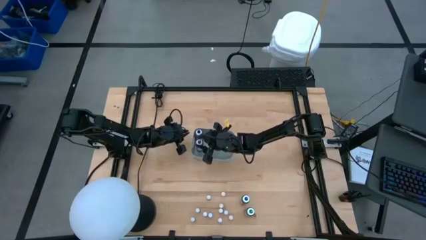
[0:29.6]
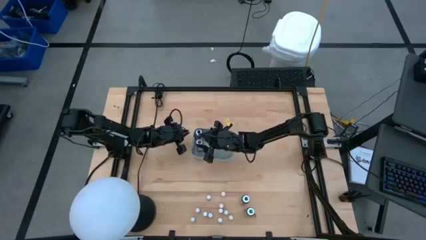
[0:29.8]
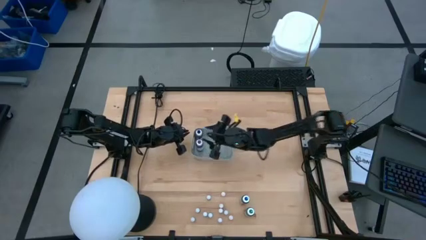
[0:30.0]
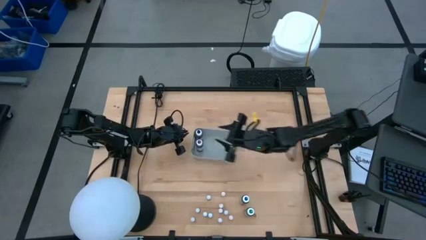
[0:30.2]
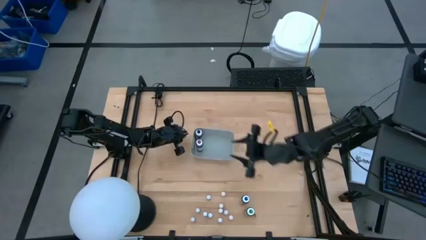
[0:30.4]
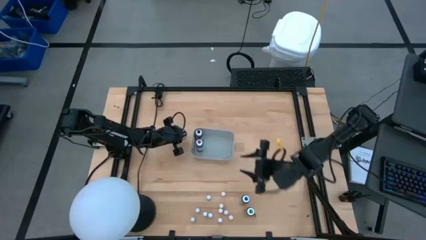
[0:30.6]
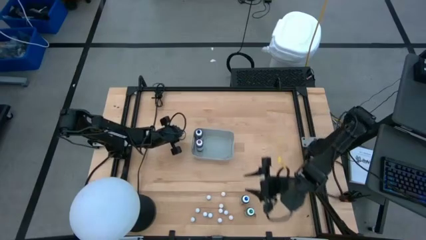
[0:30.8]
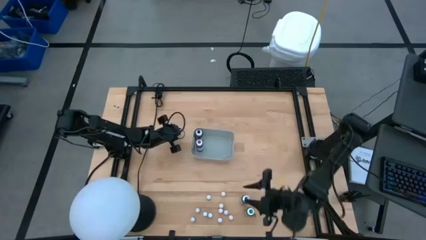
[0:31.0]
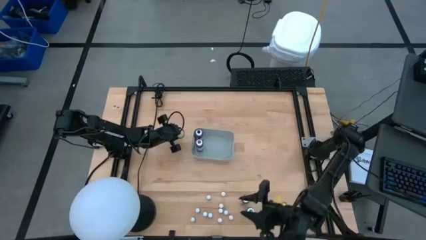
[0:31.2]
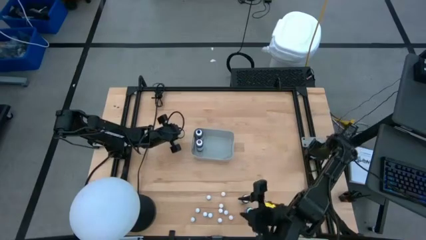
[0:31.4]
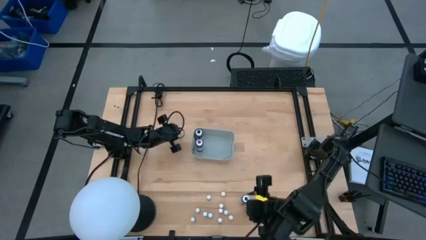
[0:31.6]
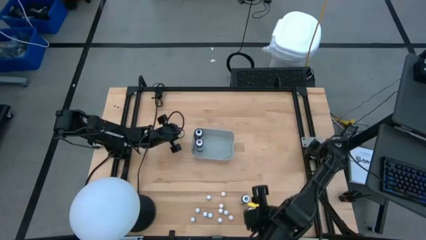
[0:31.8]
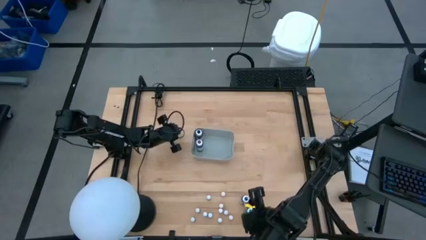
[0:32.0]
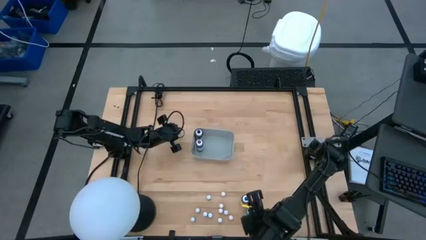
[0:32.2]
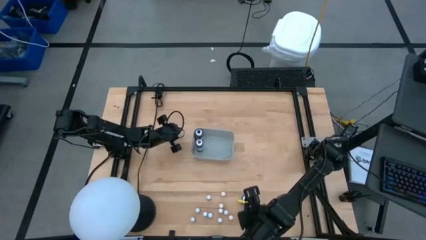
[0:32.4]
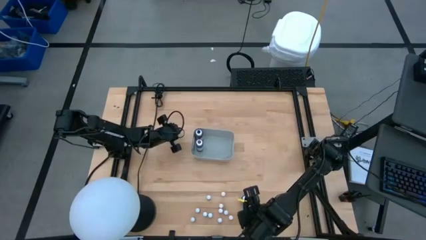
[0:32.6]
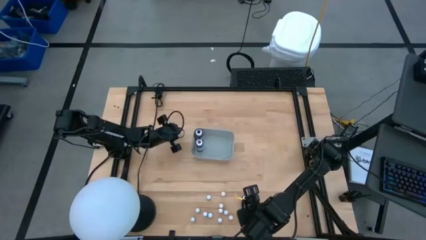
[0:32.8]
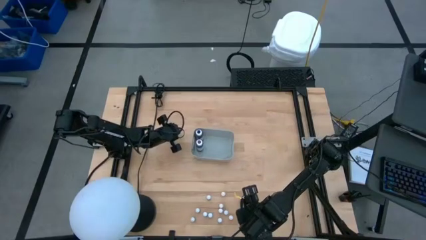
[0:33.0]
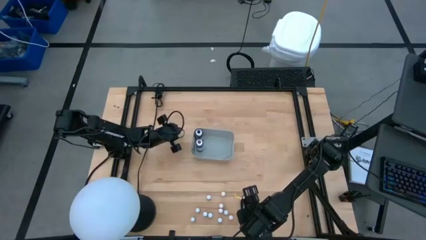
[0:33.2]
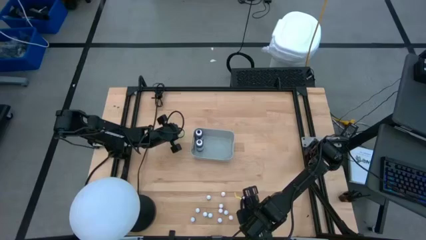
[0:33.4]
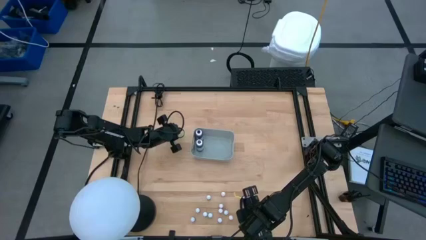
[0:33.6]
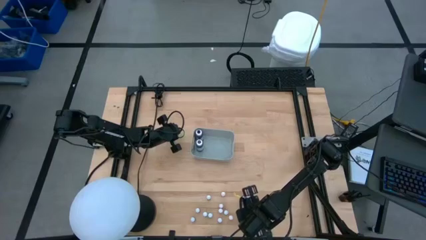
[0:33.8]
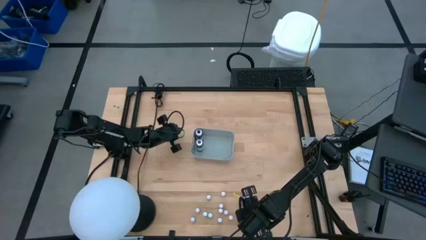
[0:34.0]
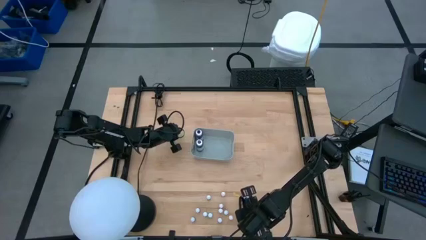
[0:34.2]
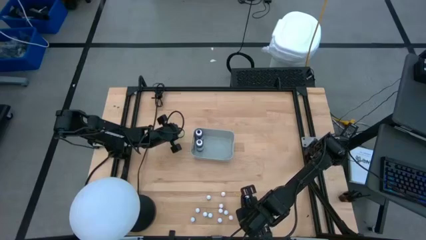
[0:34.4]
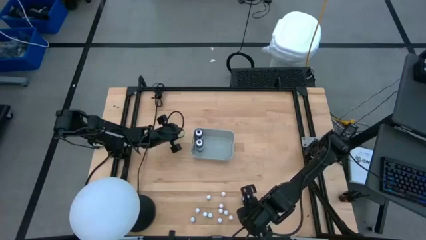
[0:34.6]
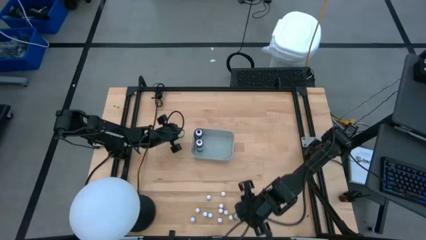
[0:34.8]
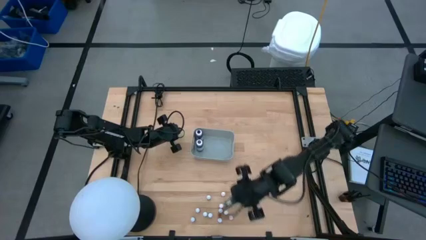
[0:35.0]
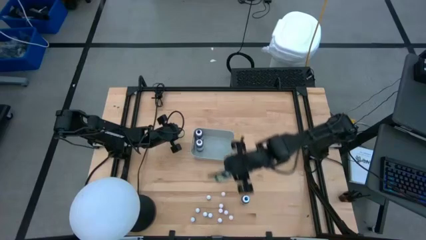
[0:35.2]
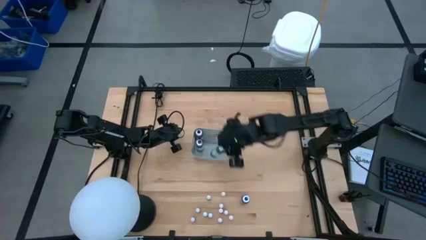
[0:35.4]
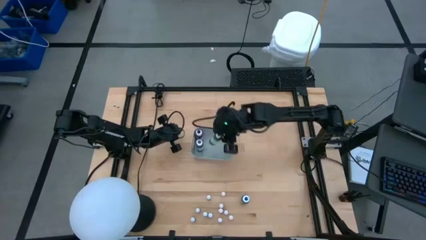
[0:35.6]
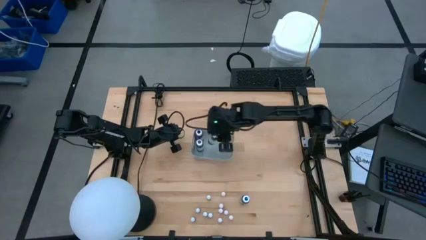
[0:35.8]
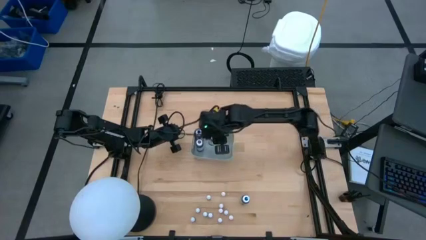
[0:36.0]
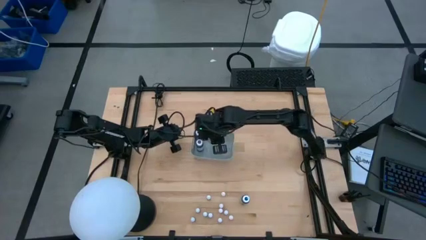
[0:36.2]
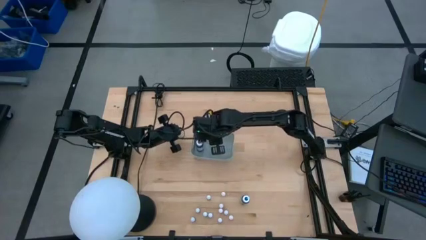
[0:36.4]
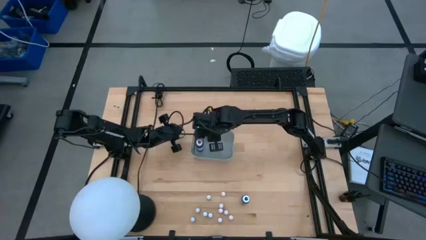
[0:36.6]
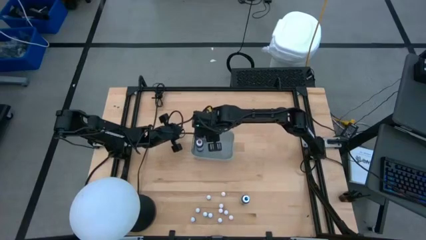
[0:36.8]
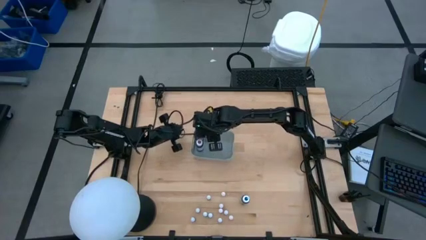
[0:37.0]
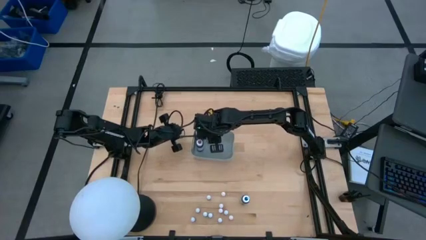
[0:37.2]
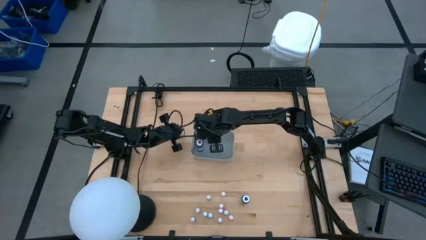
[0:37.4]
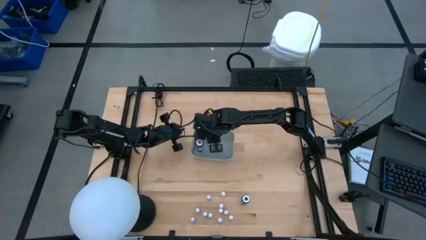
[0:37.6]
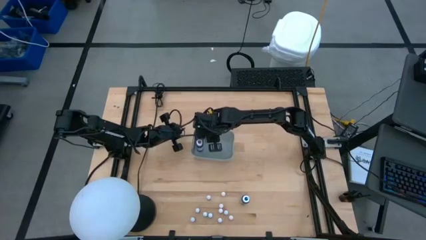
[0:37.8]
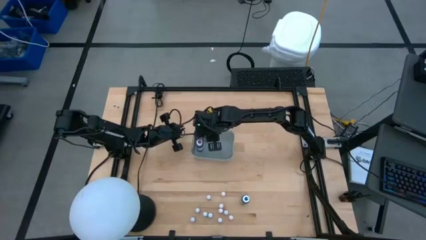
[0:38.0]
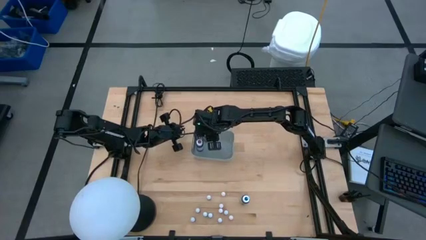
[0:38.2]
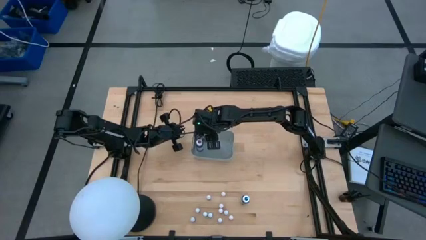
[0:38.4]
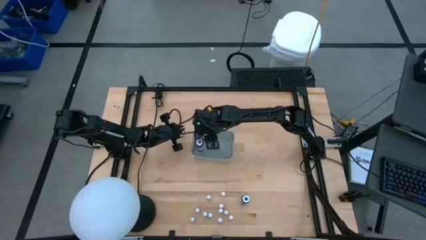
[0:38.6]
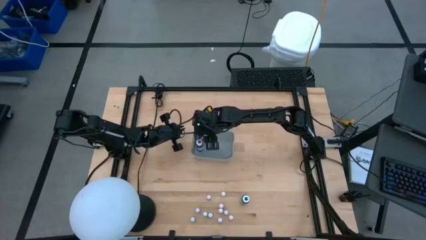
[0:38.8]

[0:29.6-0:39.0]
Task: Pick & Place food coloring
Put the large green food coloring bottle into the gray bin

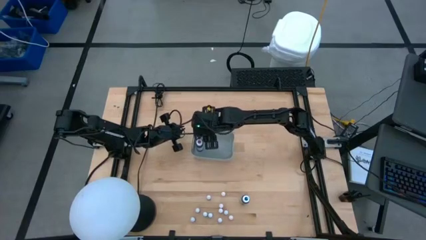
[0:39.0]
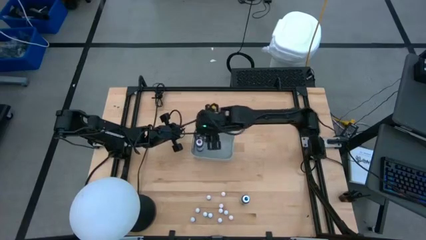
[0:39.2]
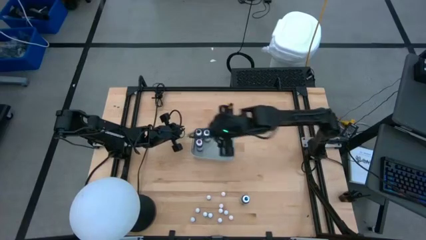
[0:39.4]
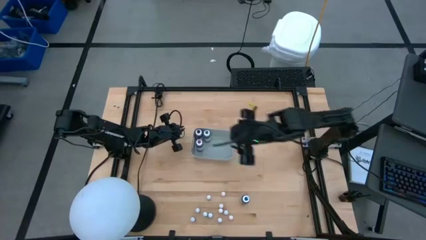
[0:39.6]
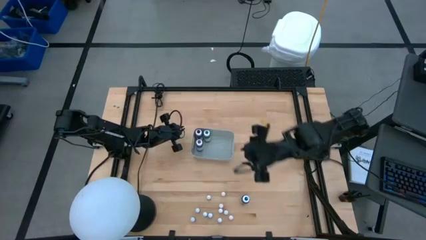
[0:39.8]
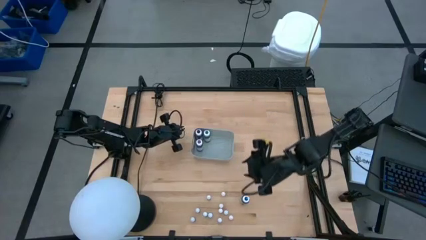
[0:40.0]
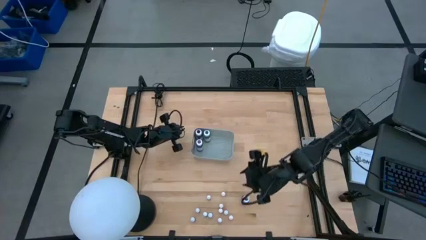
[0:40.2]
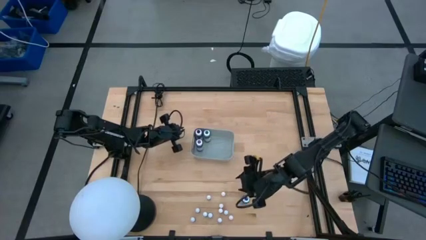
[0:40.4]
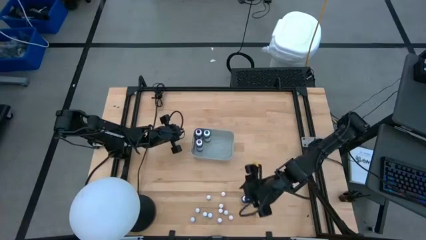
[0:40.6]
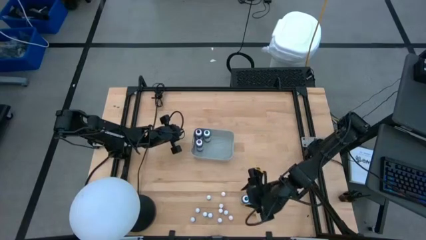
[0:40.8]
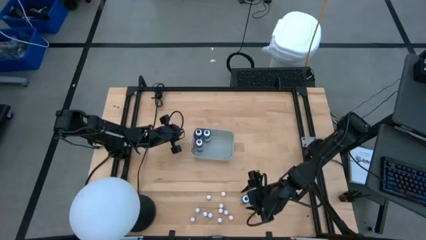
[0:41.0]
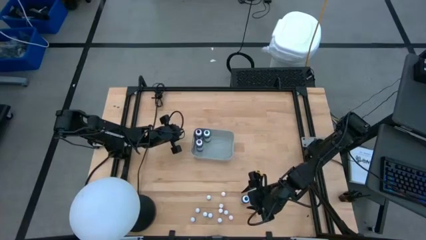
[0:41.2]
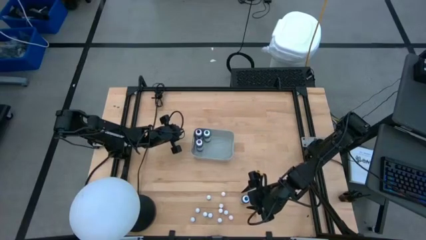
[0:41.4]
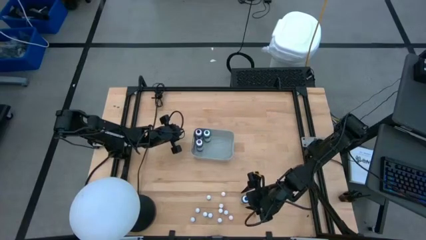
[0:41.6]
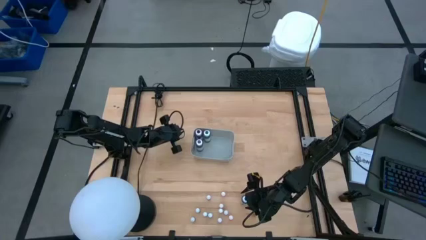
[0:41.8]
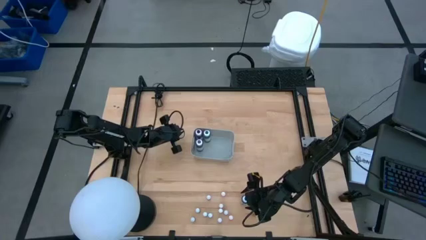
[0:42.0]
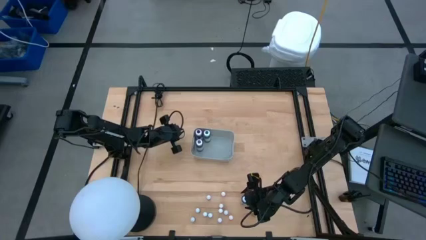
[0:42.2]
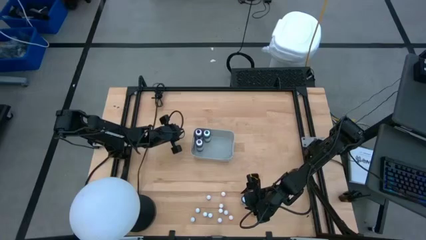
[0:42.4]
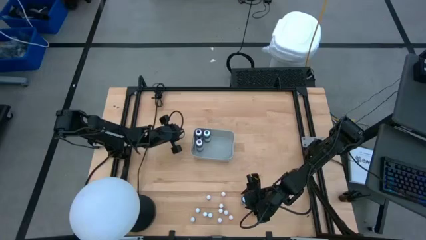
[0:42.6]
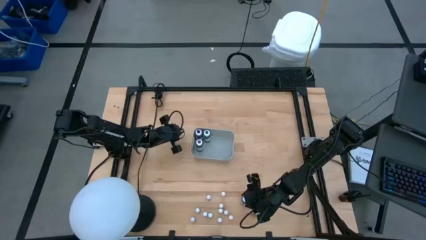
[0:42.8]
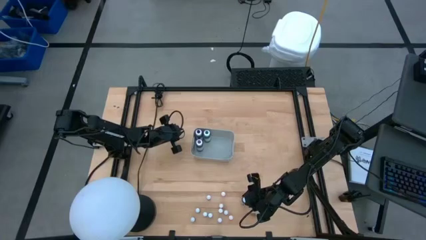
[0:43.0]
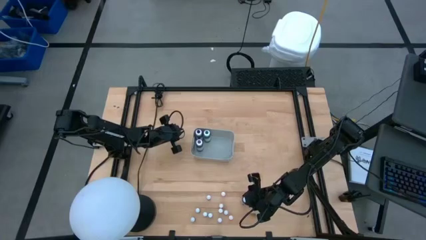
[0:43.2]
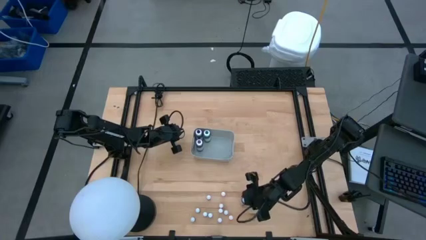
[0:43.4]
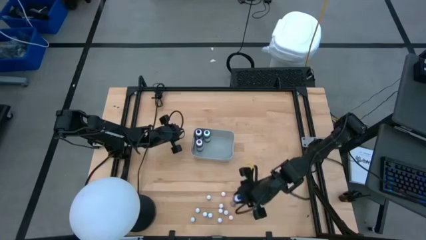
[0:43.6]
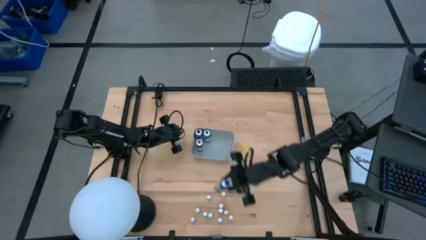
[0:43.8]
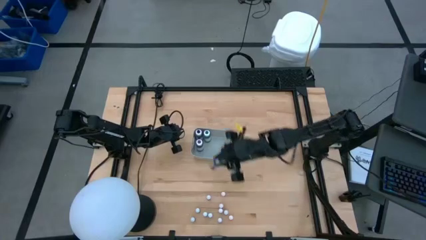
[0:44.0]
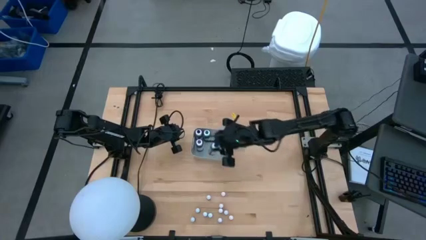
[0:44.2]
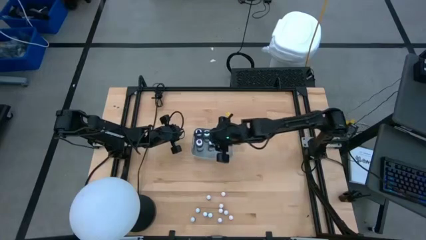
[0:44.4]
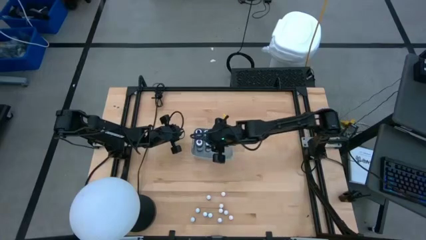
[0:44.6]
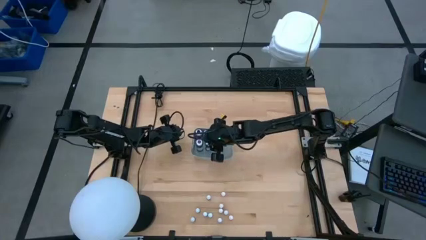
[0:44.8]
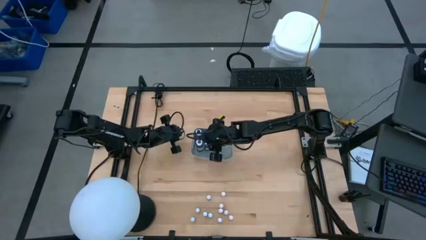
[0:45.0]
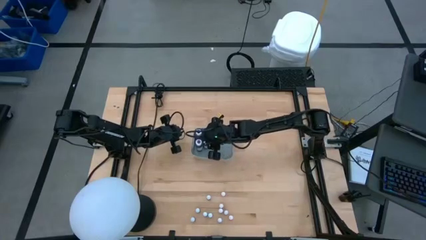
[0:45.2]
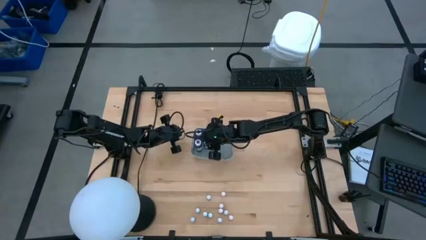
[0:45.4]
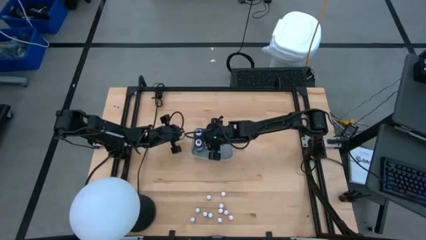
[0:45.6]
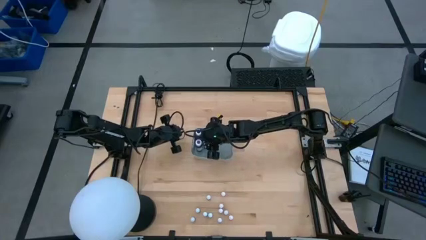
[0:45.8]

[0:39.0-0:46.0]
Put the large blue food coloring bottle into the gray bin
